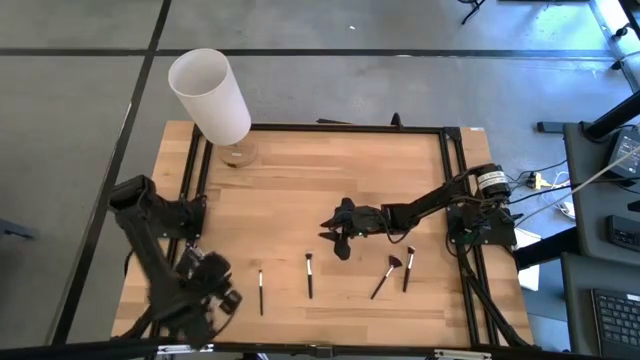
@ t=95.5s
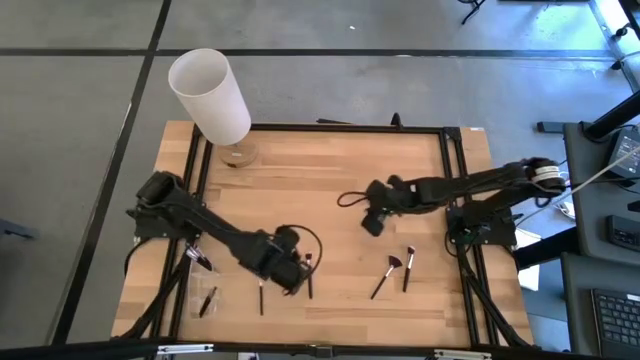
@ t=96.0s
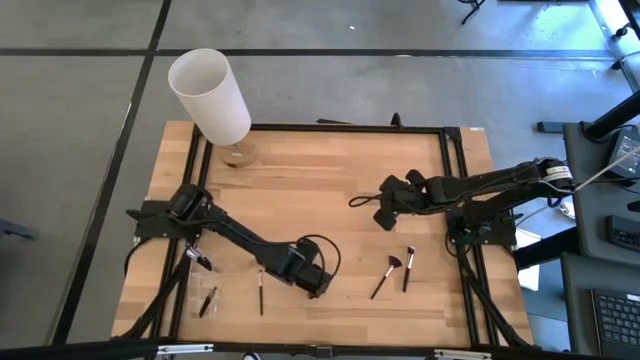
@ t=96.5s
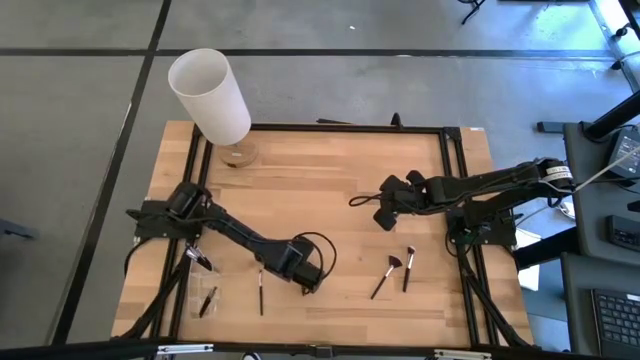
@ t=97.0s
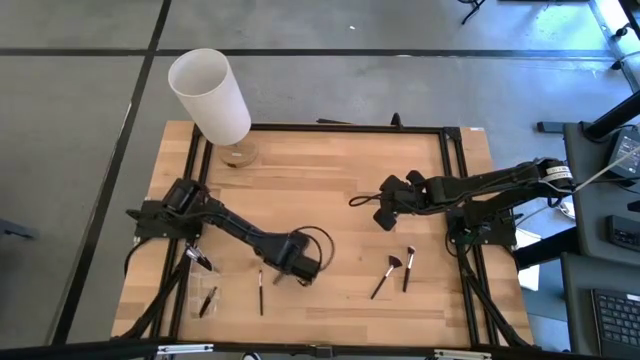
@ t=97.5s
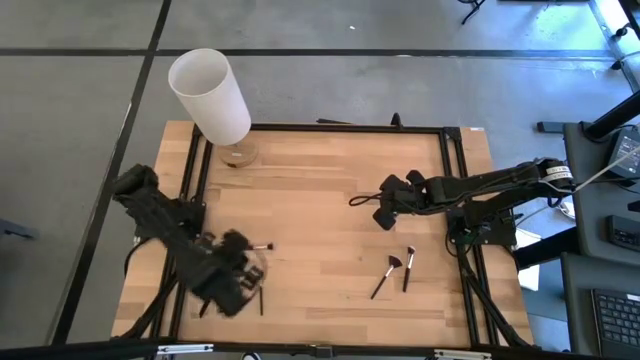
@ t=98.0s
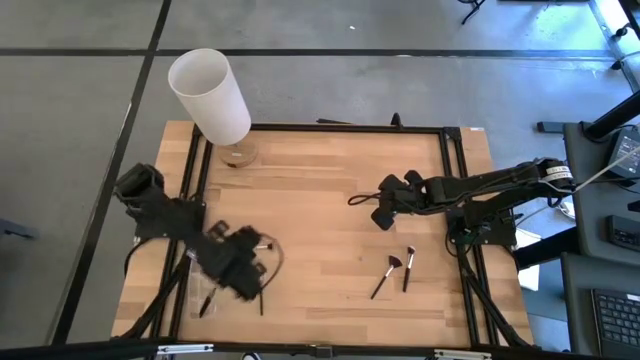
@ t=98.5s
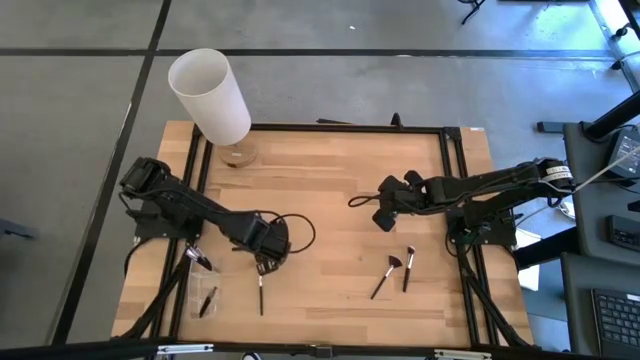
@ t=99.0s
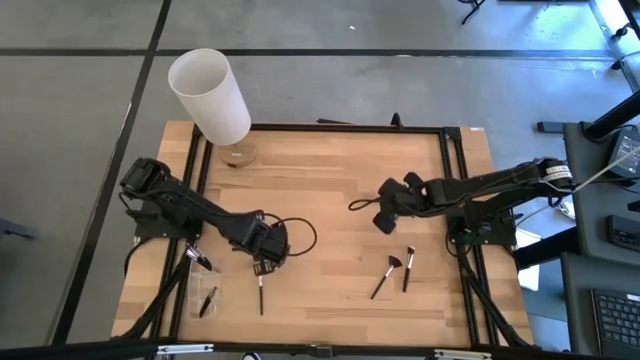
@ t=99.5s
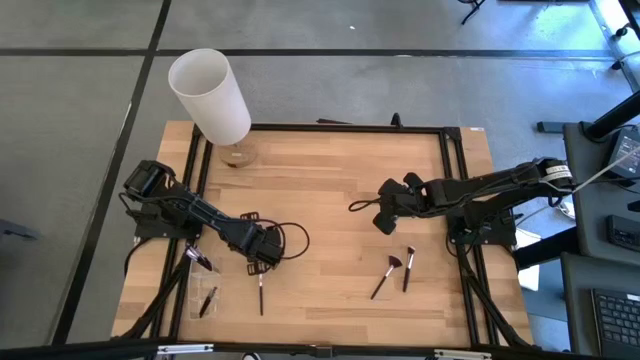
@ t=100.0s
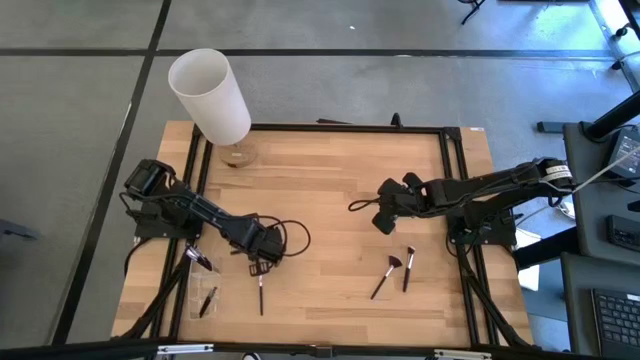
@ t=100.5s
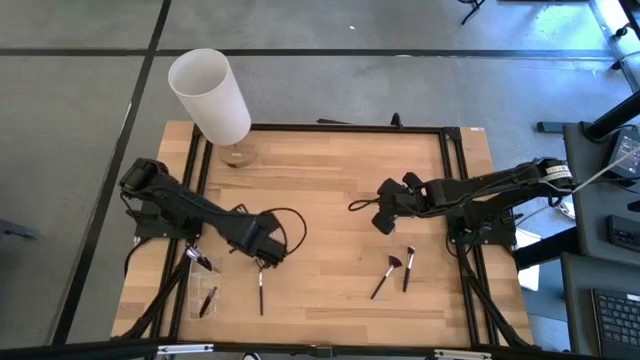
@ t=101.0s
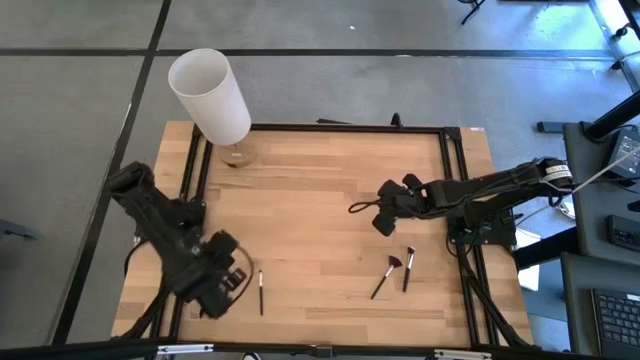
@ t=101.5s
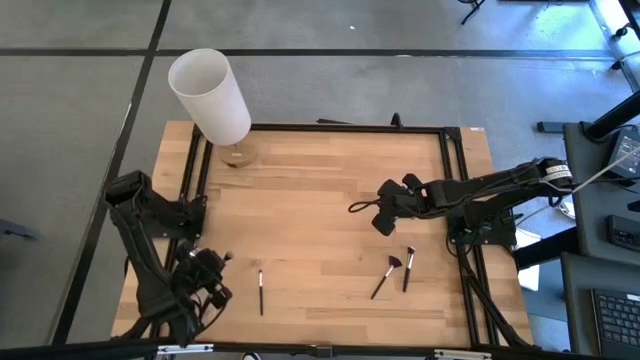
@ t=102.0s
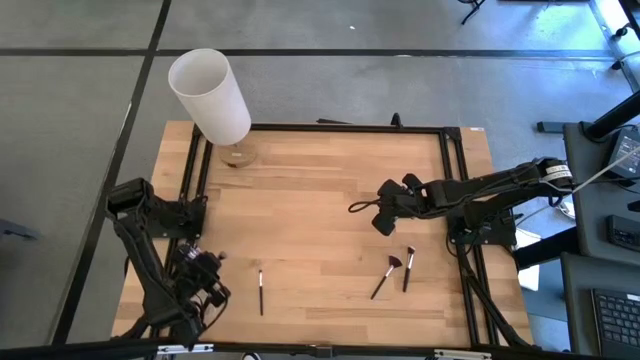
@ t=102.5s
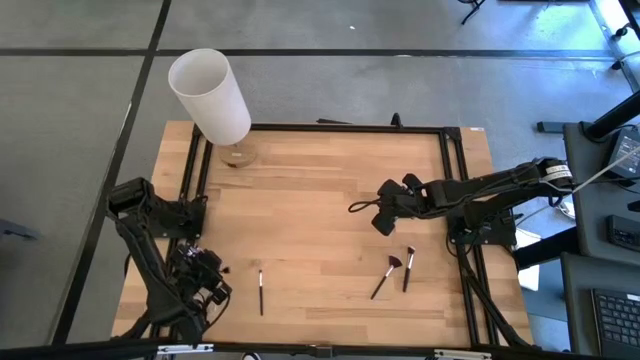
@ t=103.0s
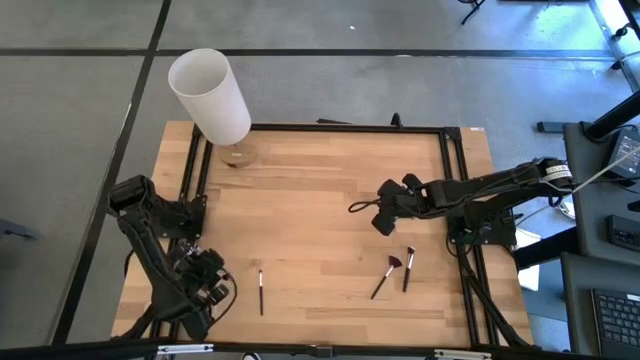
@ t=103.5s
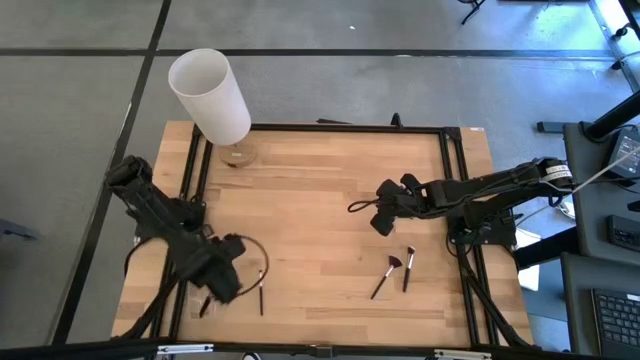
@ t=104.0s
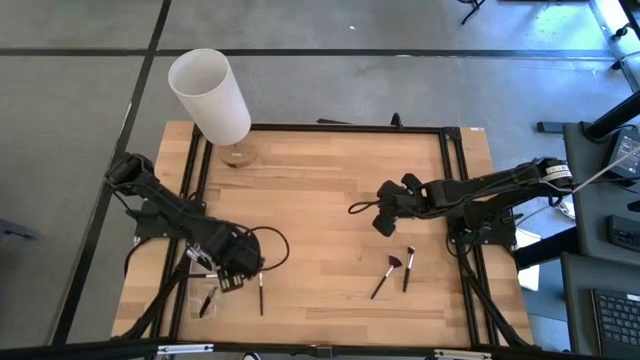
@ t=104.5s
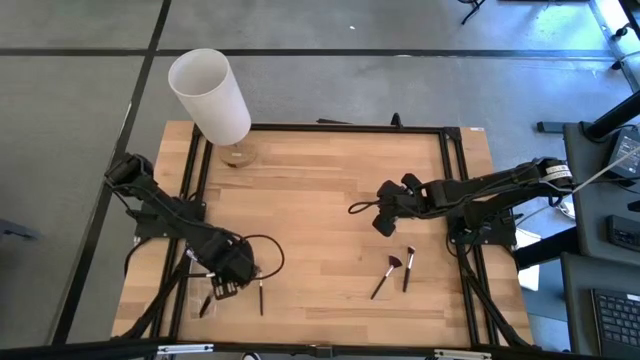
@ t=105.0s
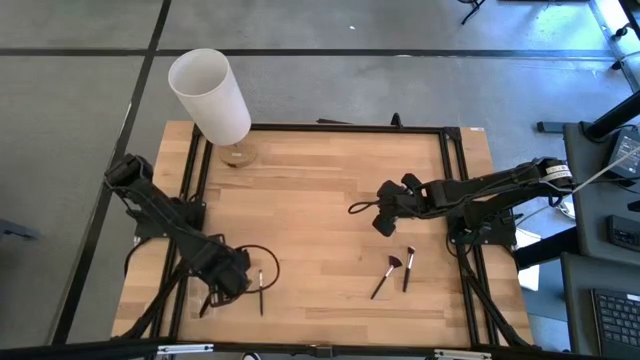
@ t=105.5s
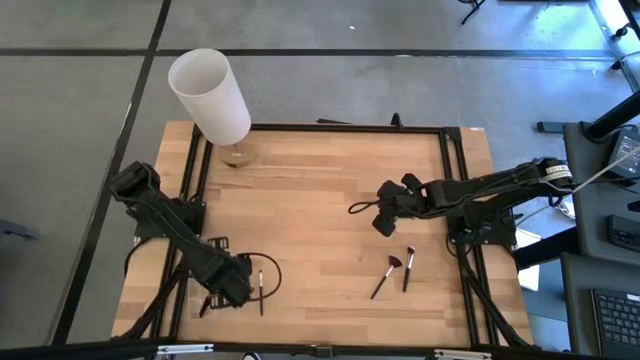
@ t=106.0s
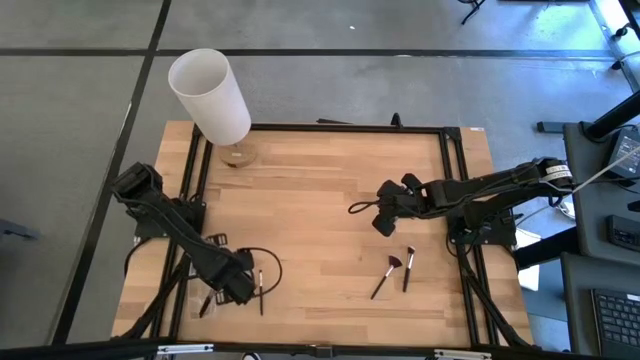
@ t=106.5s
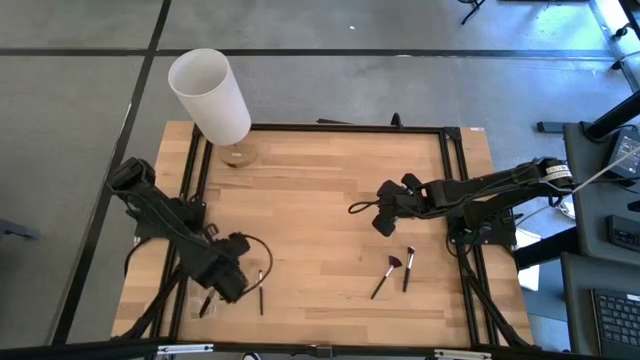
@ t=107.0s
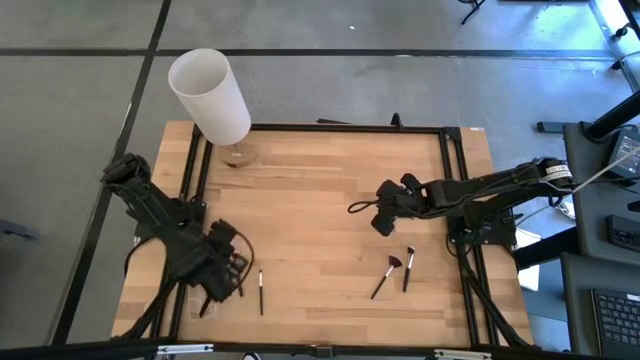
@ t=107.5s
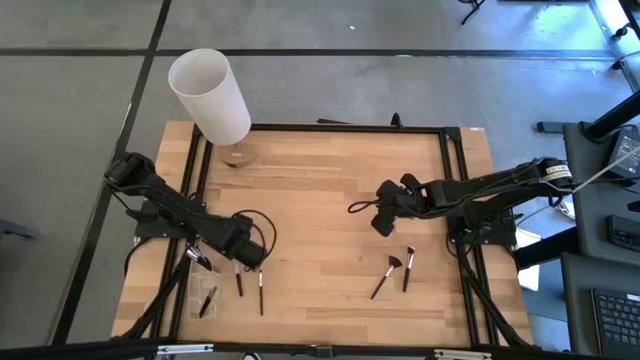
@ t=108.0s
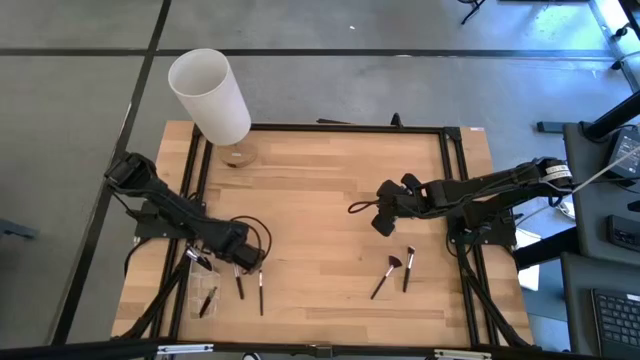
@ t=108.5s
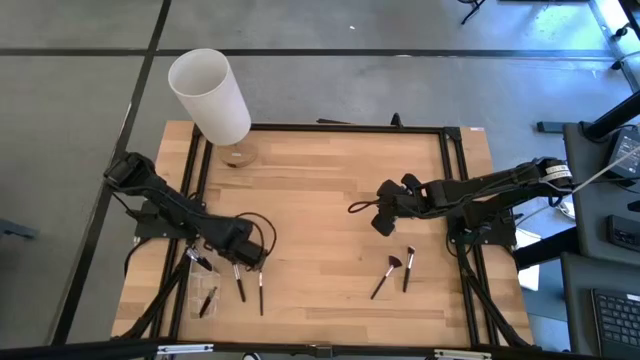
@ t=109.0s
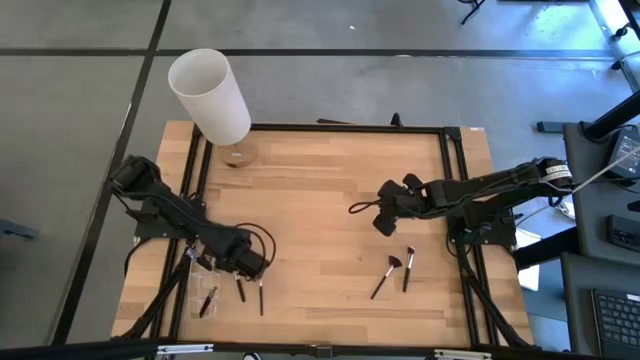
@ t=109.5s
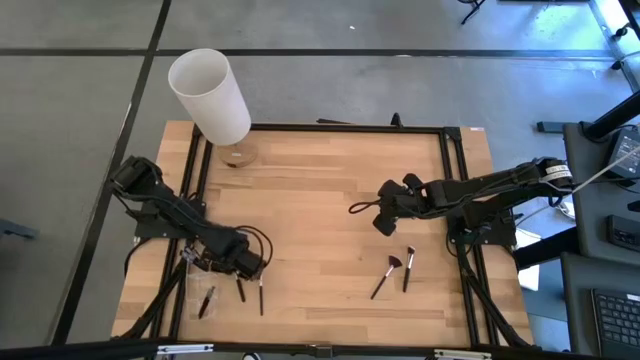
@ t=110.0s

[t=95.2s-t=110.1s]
Task: Put items in baskets/containers
Put the powder brush into the transparent organizer

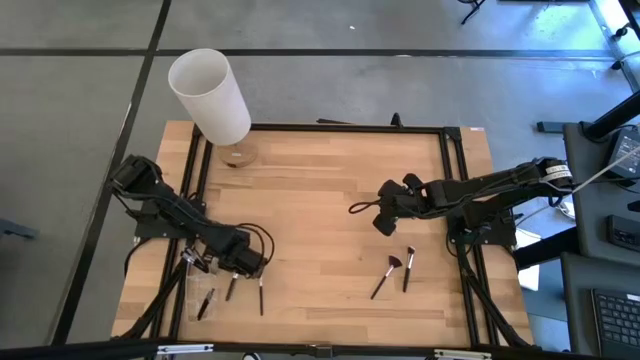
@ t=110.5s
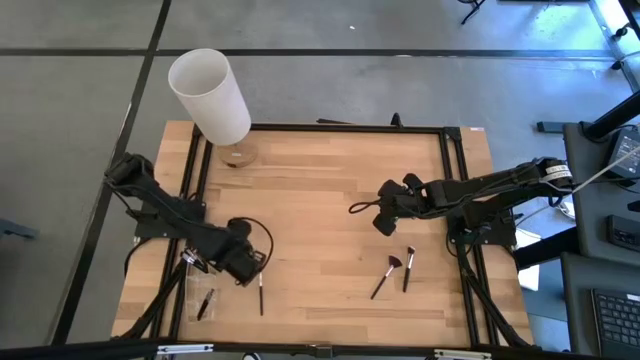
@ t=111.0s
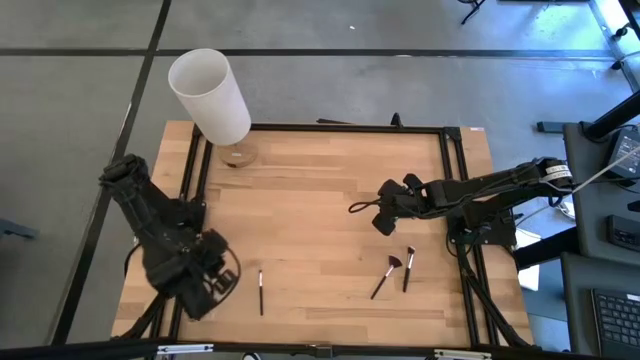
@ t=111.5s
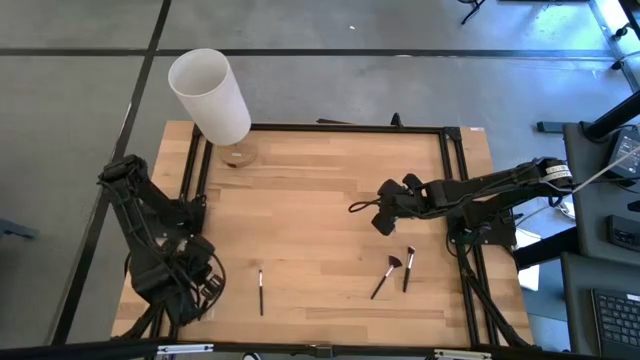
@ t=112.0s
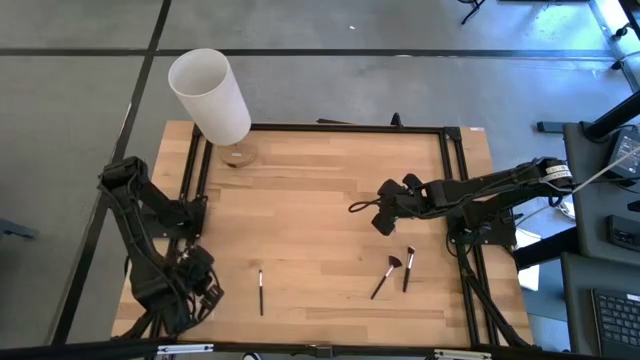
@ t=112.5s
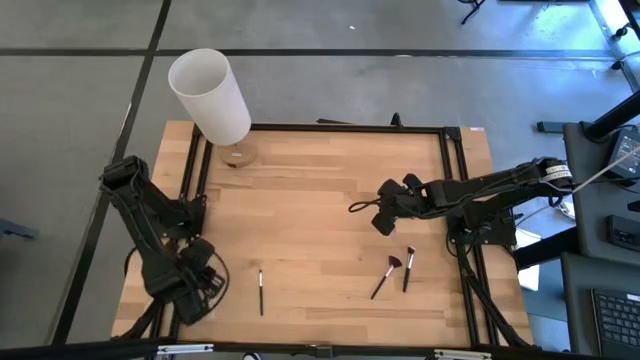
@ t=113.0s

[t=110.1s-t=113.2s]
Put the powder brush into the transparent organizer

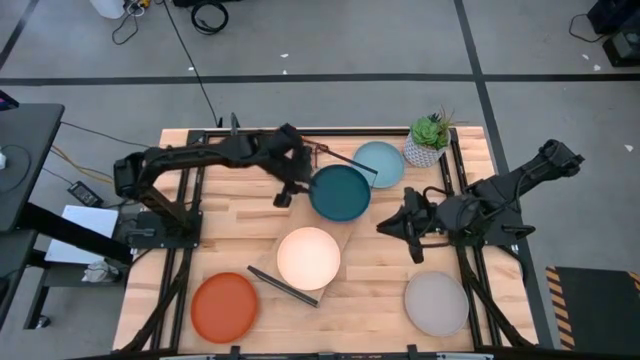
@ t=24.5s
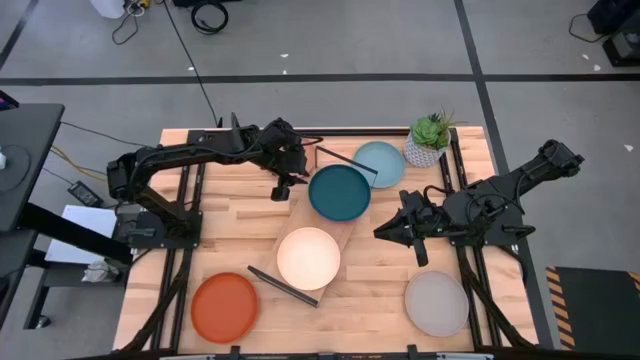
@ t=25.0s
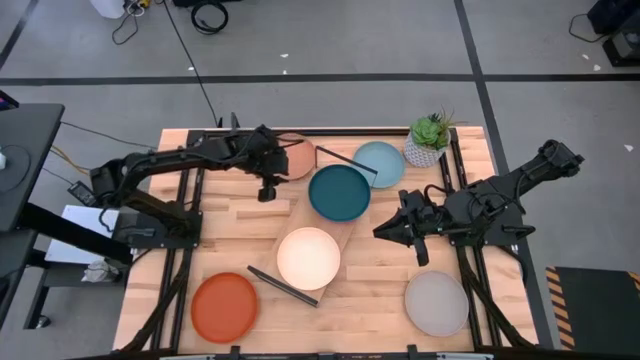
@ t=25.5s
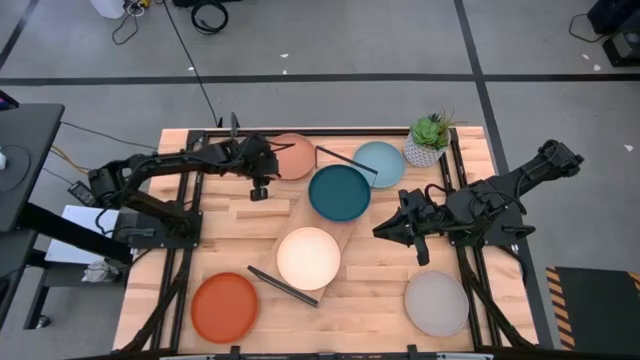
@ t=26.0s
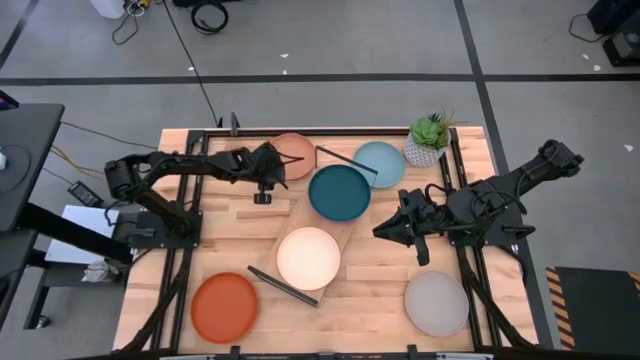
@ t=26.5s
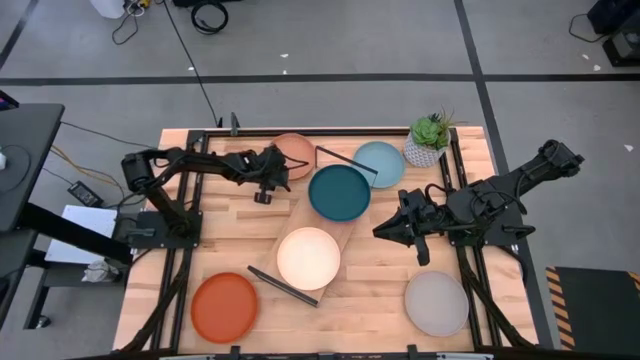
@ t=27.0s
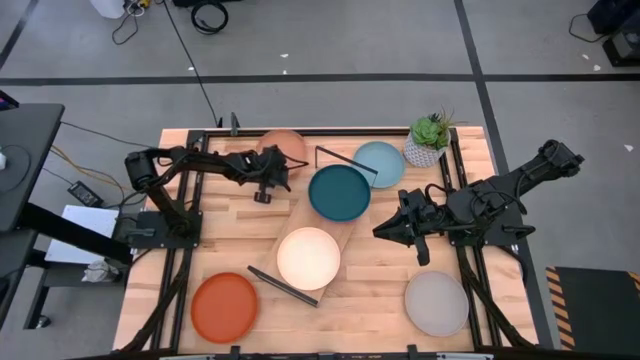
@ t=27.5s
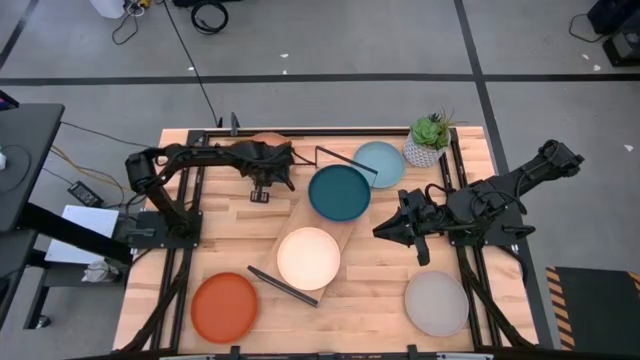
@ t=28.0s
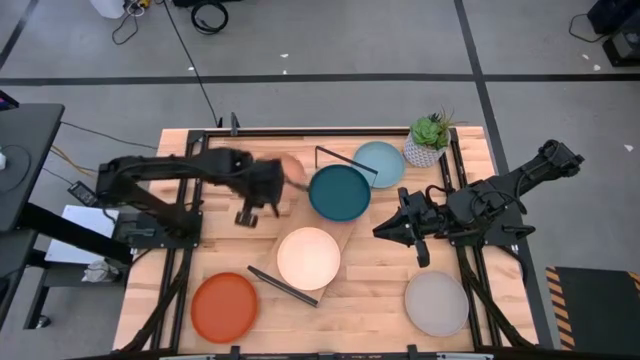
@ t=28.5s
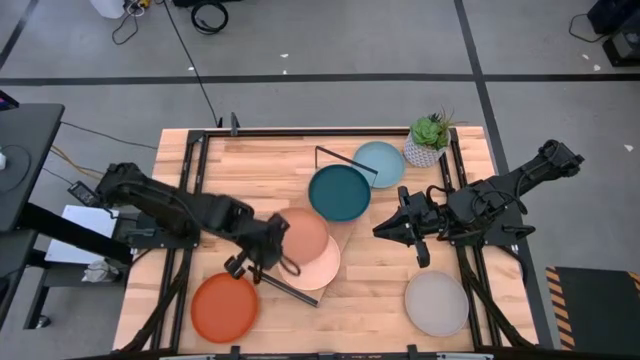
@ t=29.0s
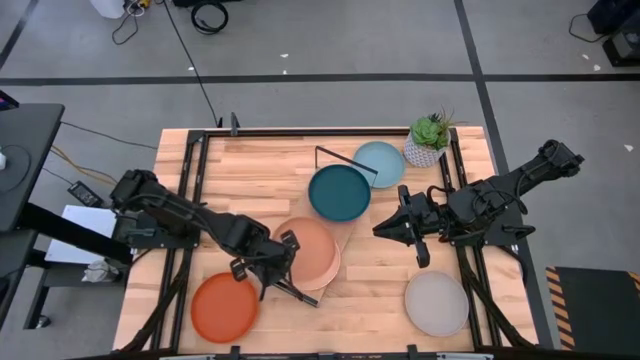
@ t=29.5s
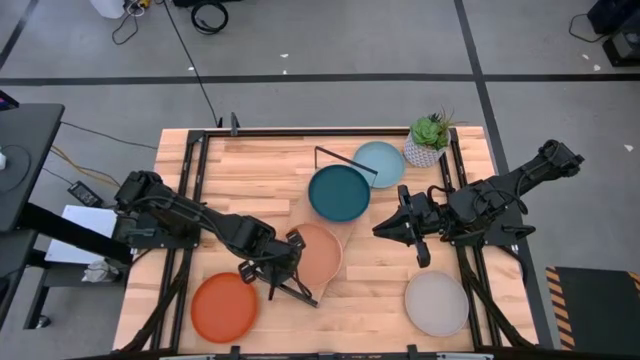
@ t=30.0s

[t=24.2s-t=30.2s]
Task: Place and stack plates onto a shelf
Stack the brown plate on top of the peach plate on the shelf
